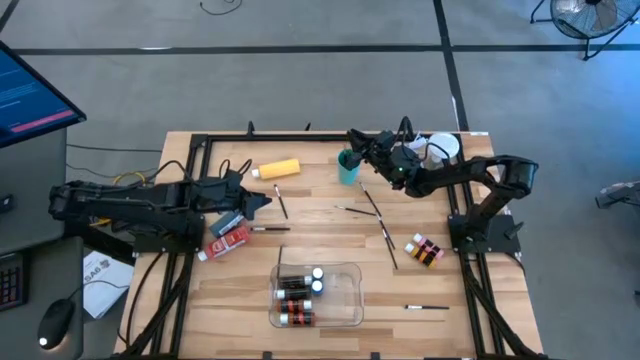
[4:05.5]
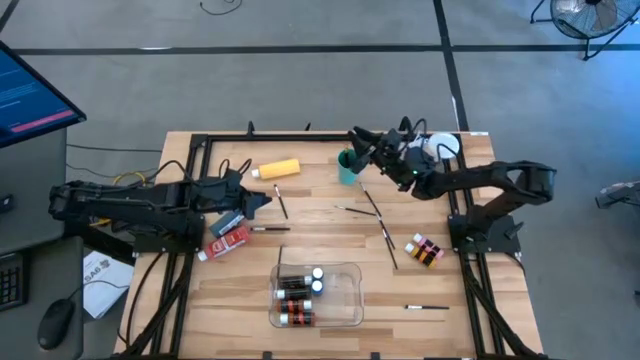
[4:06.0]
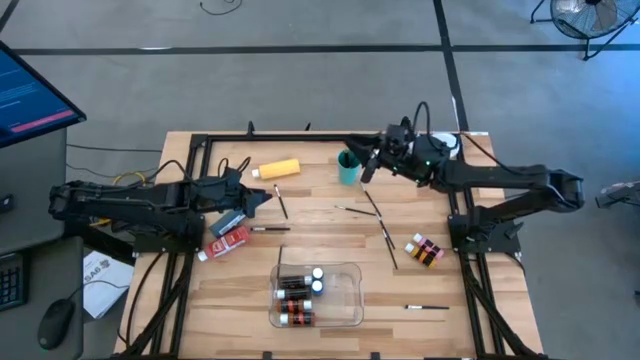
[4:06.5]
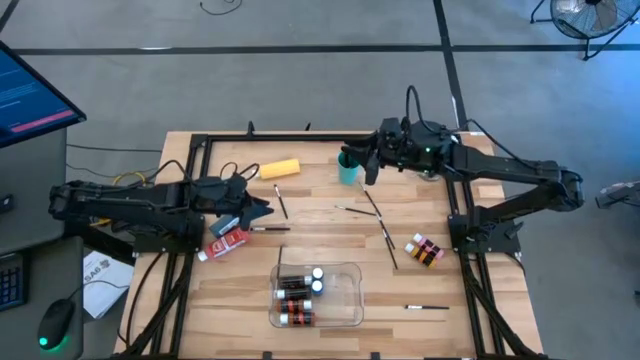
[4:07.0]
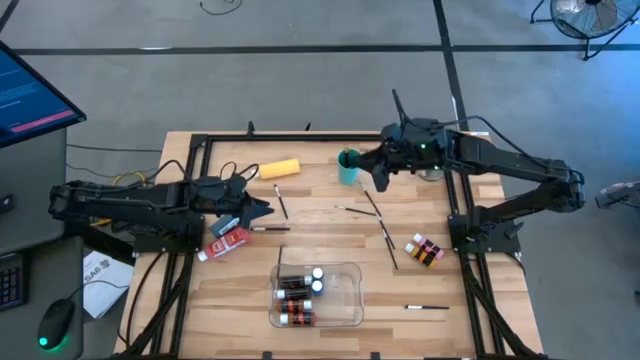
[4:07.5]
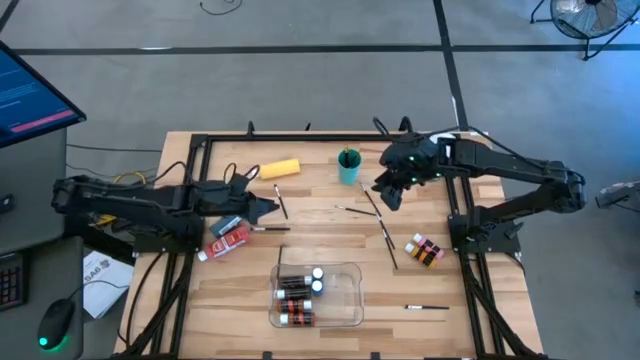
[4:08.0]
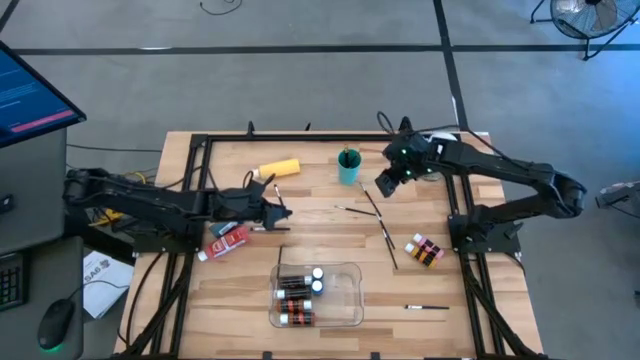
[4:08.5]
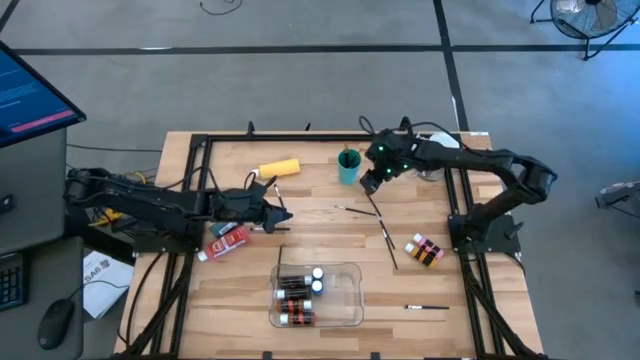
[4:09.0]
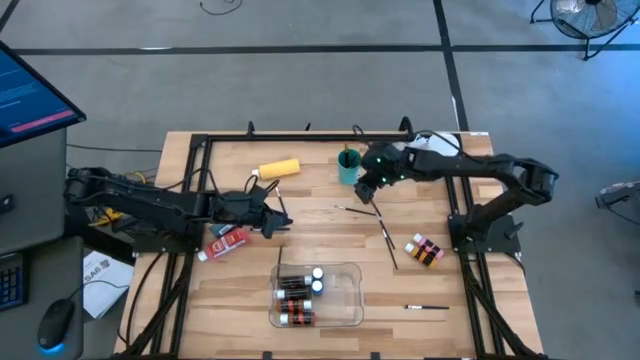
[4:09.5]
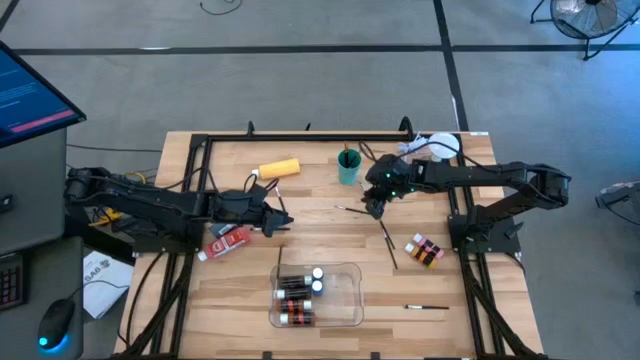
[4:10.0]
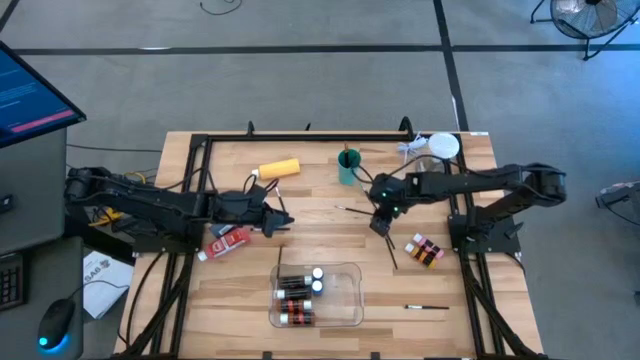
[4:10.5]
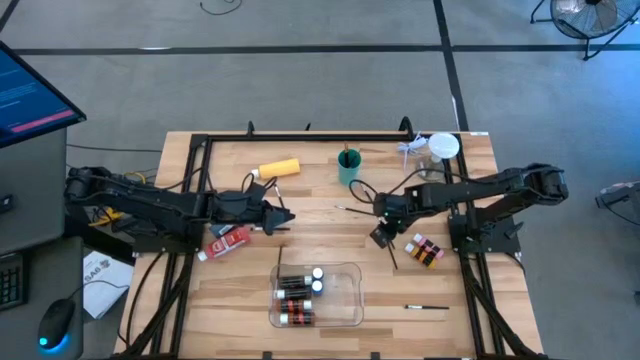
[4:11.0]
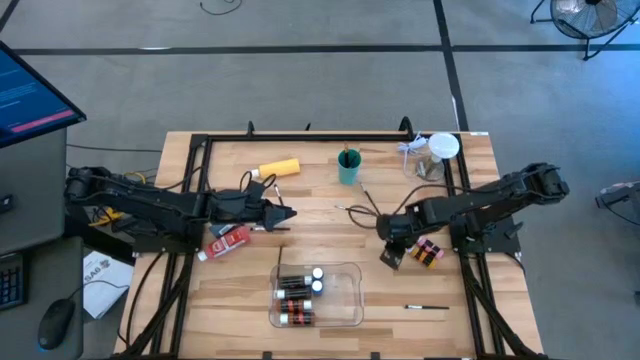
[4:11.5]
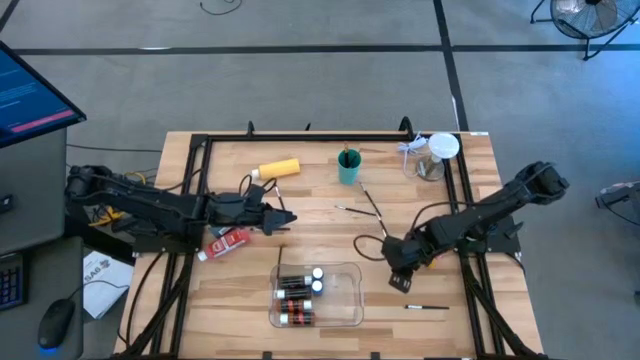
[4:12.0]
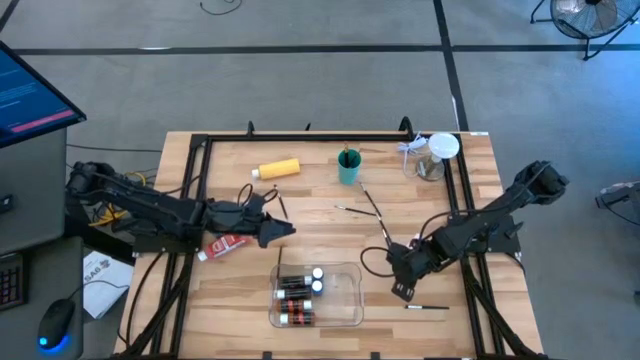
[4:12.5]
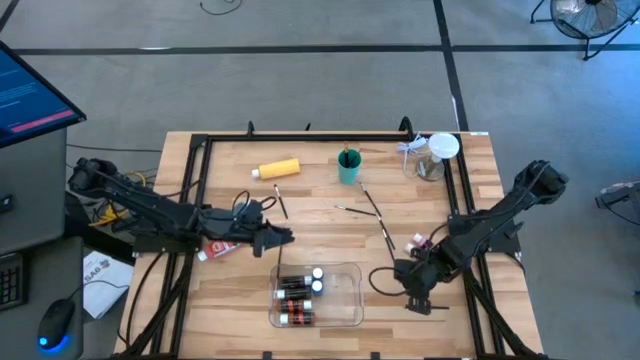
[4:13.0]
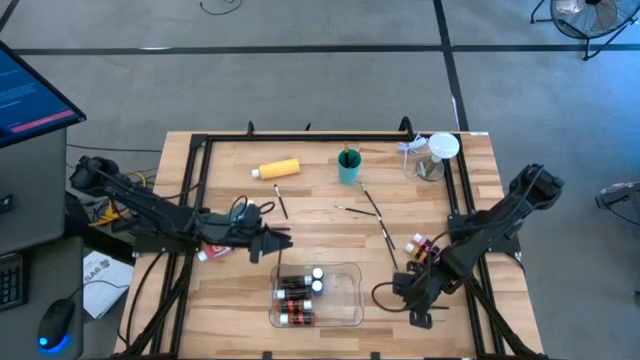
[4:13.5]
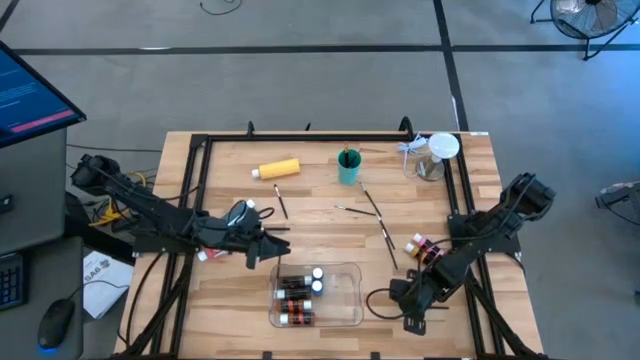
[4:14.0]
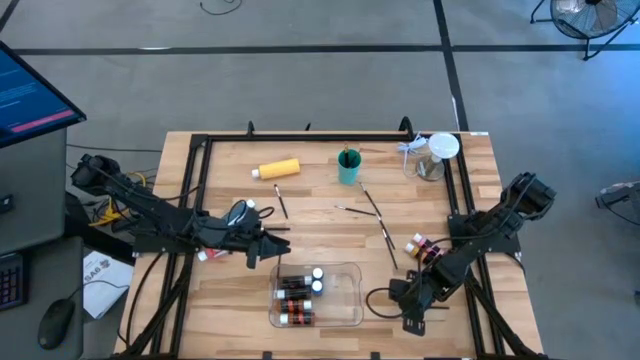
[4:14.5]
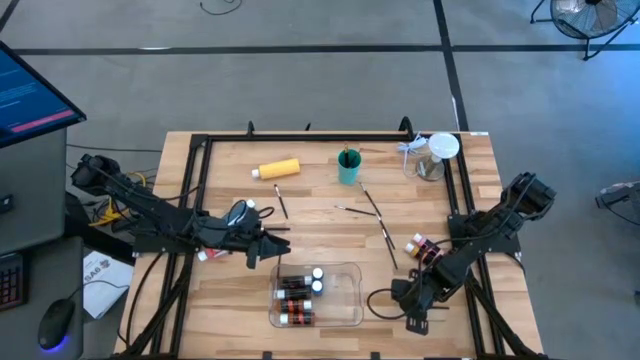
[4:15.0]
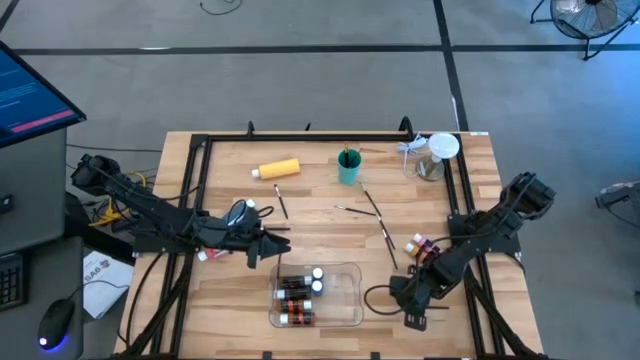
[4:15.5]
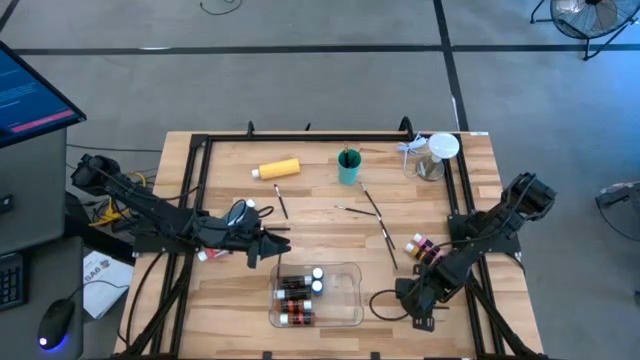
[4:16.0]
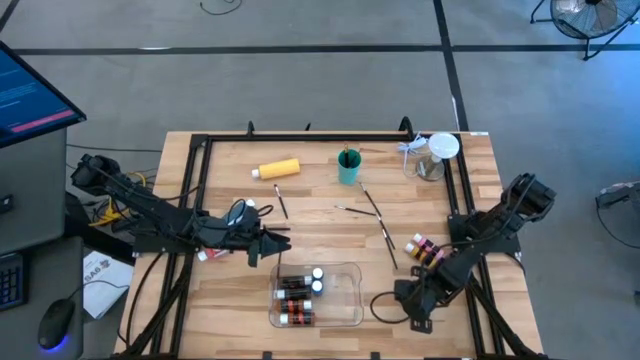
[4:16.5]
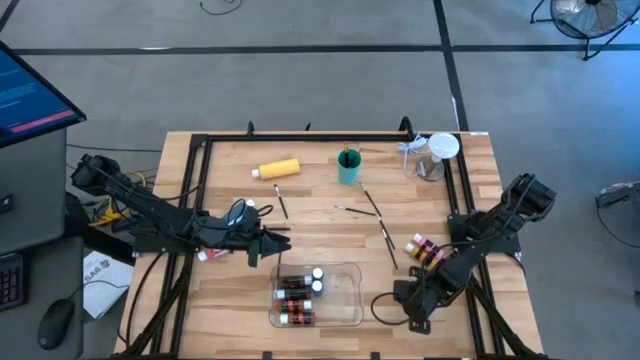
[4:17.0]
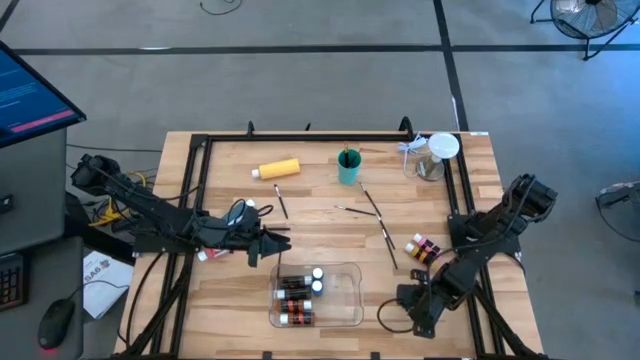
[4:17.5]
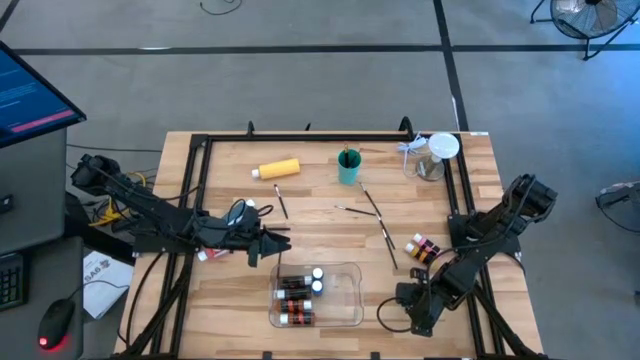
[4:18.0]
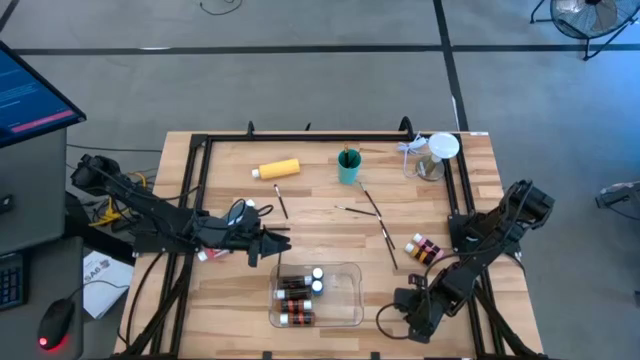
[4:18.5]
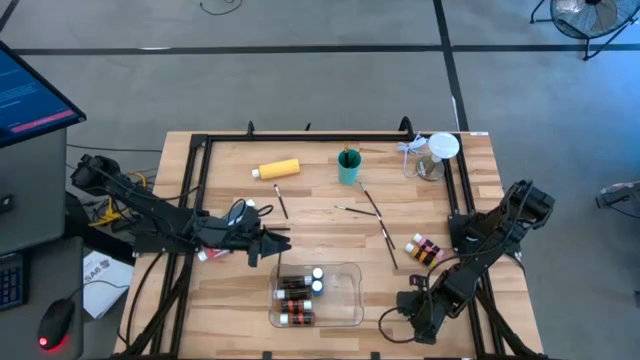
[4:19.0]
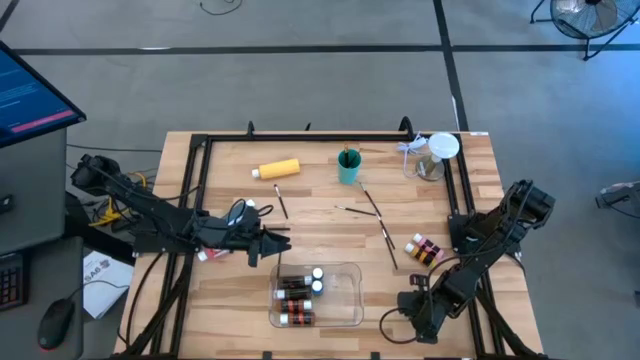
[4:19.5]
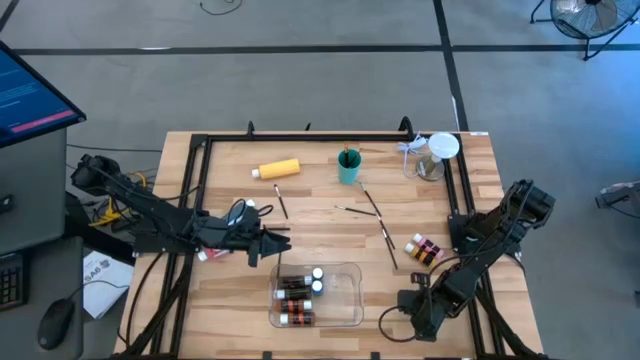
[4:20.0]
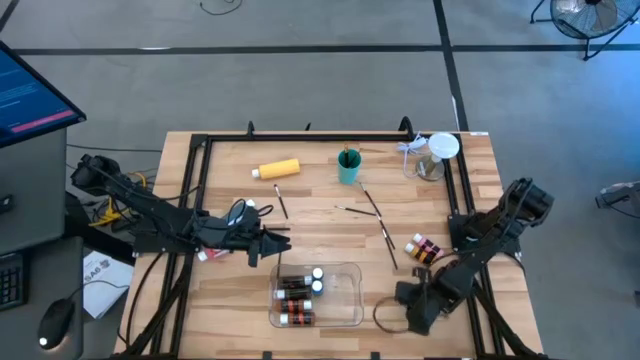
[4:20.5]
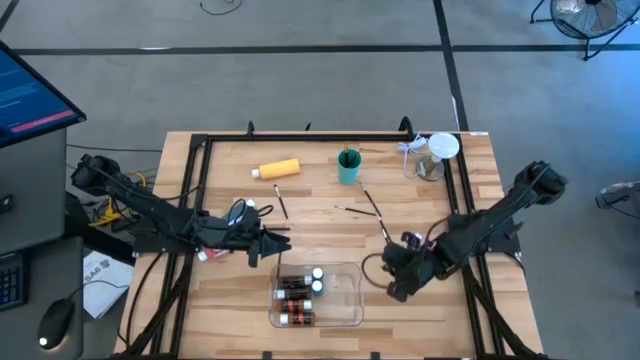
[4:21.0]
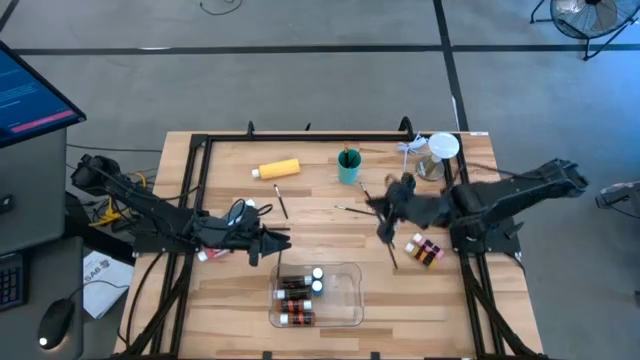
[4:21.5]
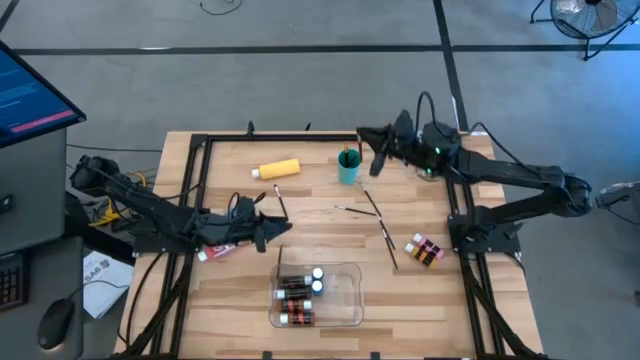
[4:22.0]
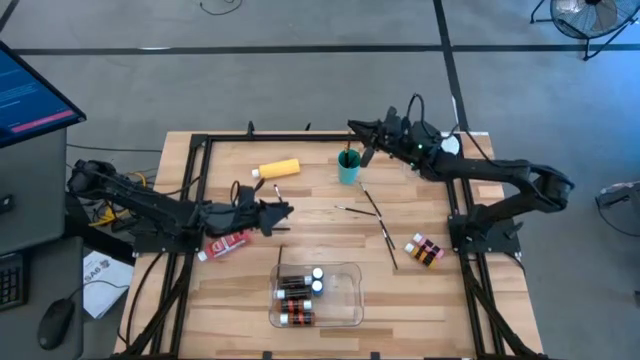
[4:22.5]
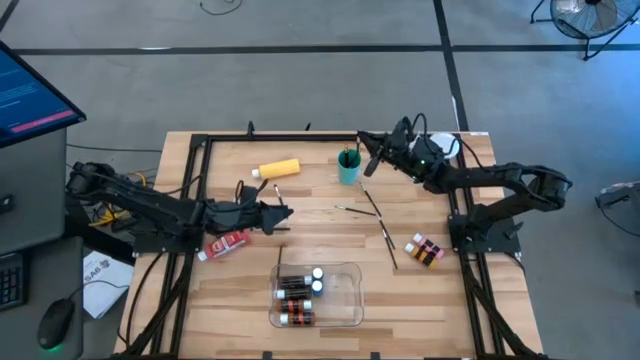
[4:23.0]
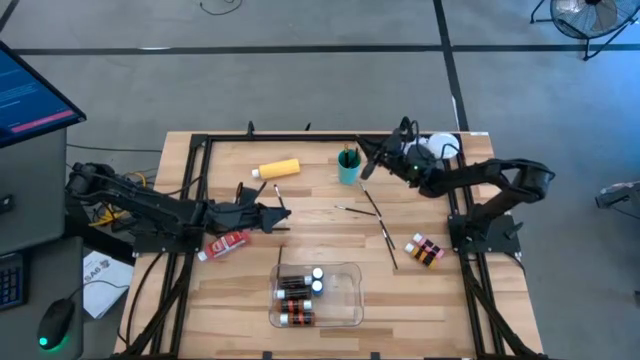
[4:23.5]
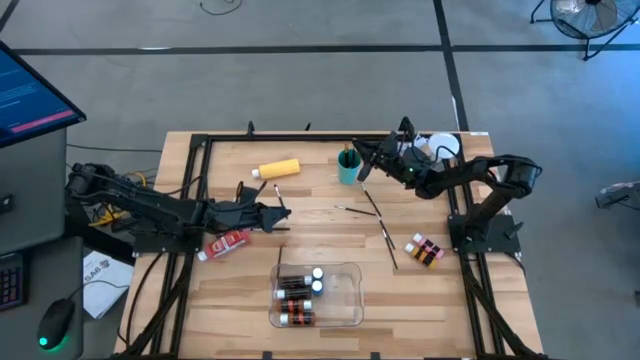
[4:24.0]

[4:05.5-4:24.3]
Task: Pick & Place Paint Supplies
Put the silver paint brush into the green cup

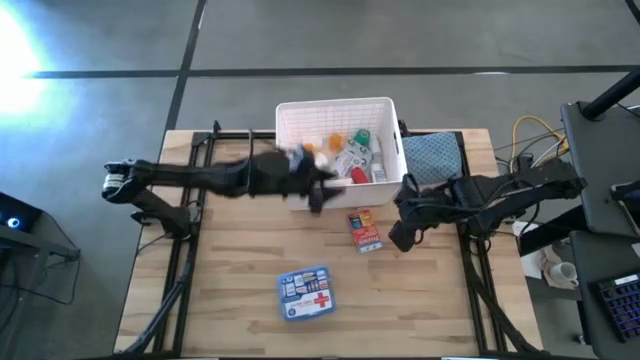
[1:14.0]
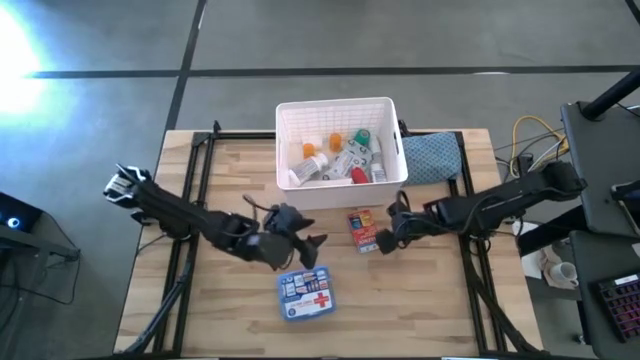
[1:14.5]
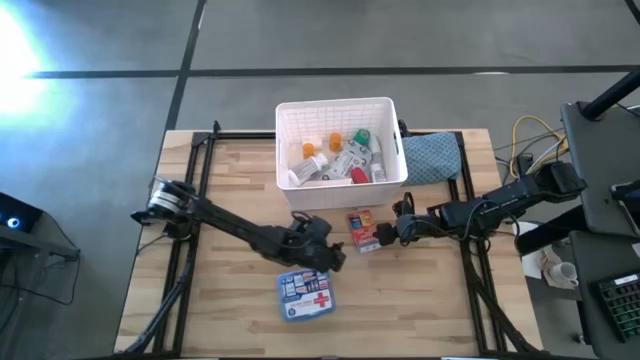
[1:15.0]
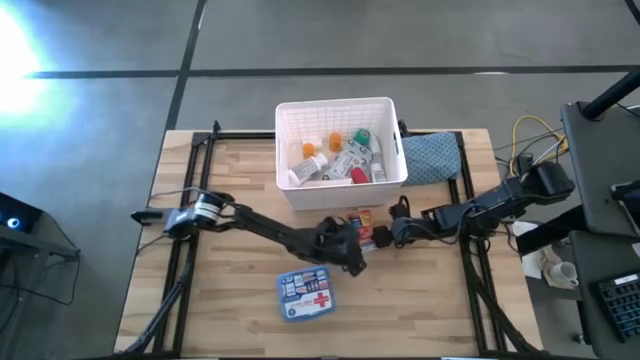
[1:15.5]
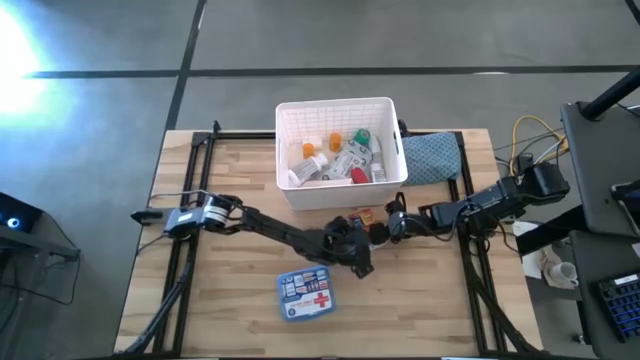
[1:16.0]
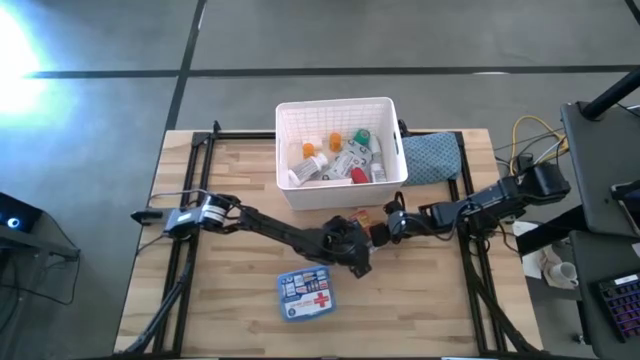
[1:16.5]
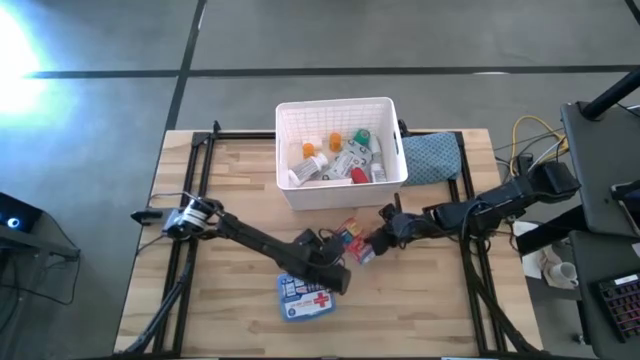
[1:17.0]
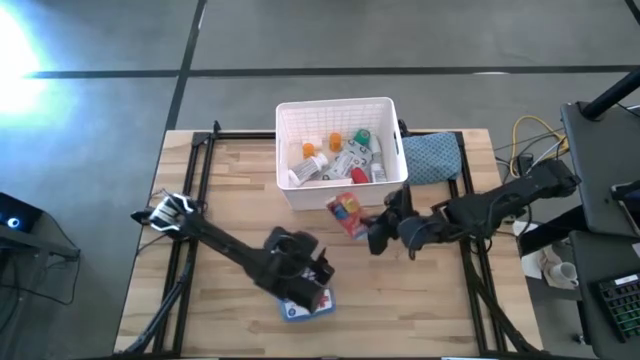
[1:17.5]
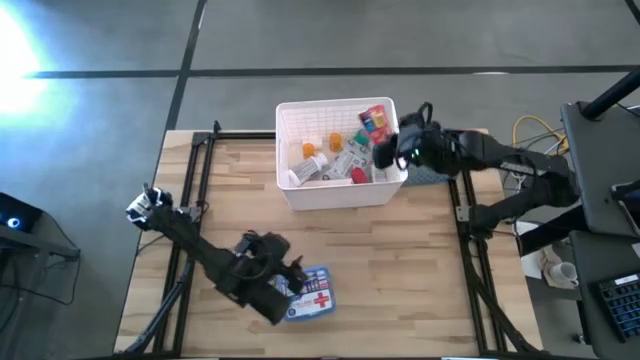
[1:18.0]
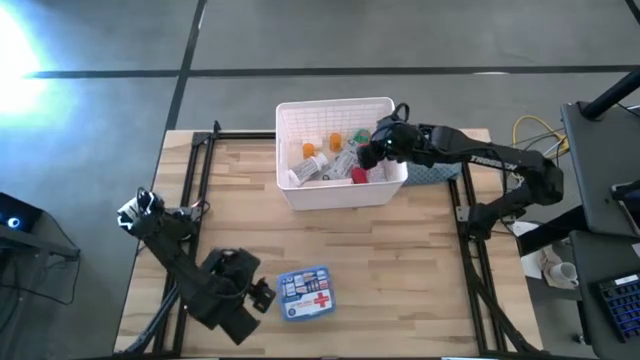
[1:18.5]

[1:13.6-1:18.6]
Task: Pick & place medical supplies in basket/bin
Put the red caplet box into the white container
